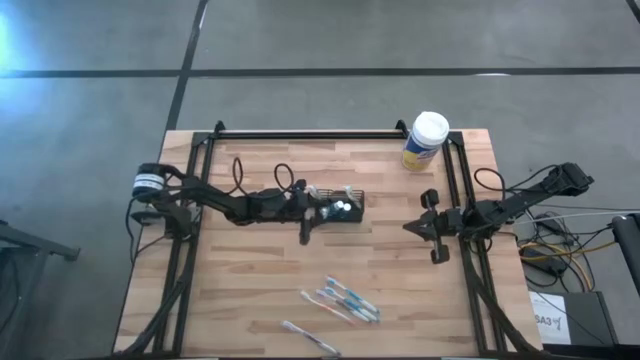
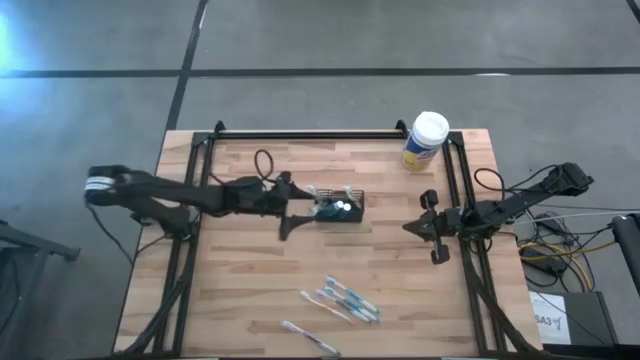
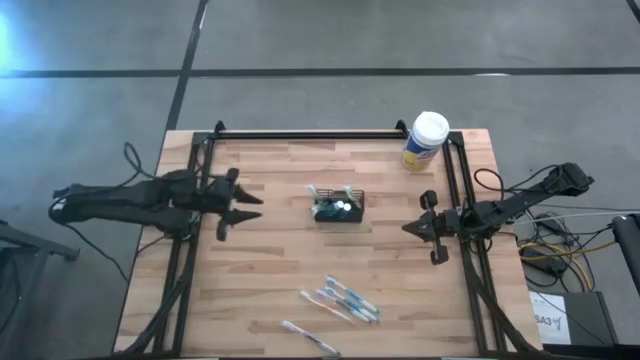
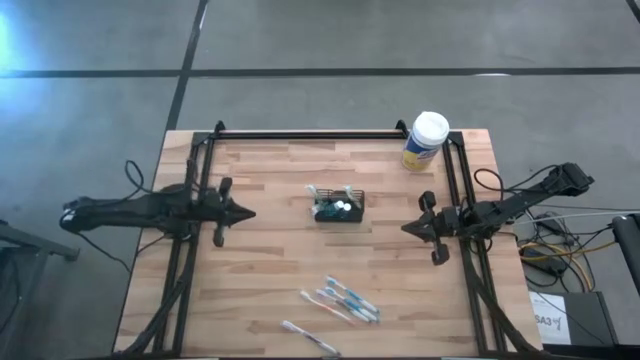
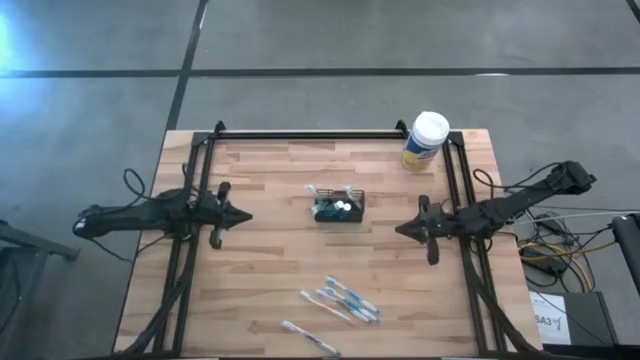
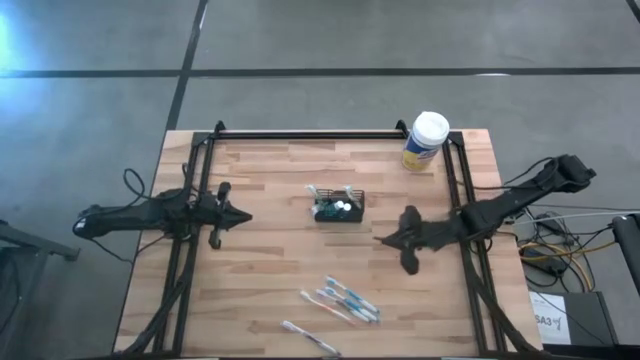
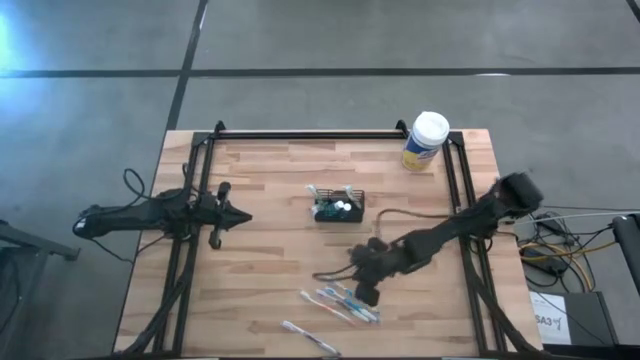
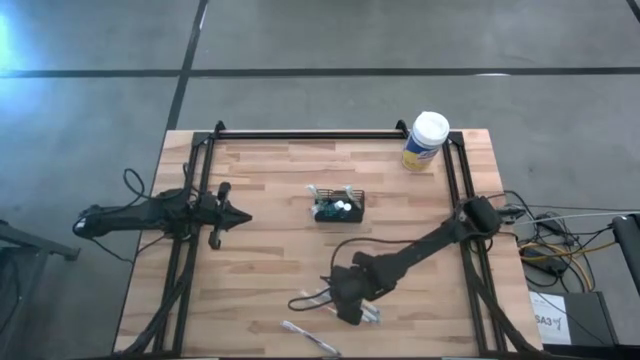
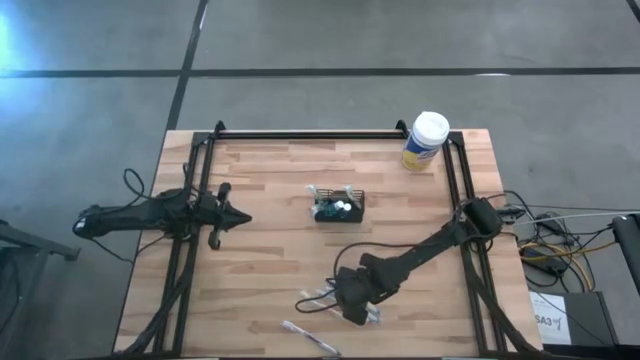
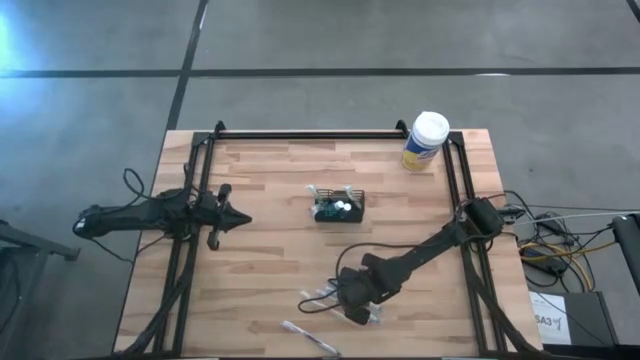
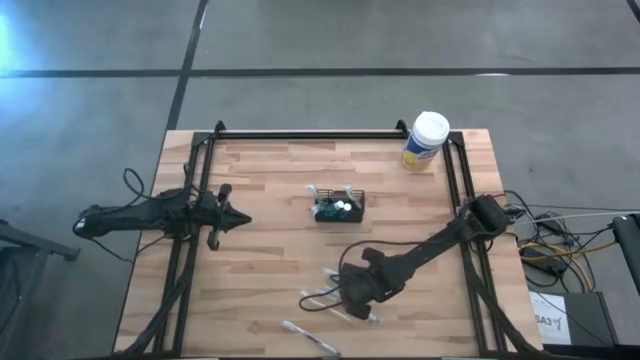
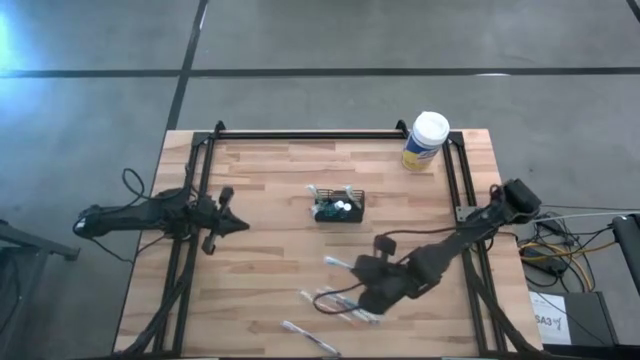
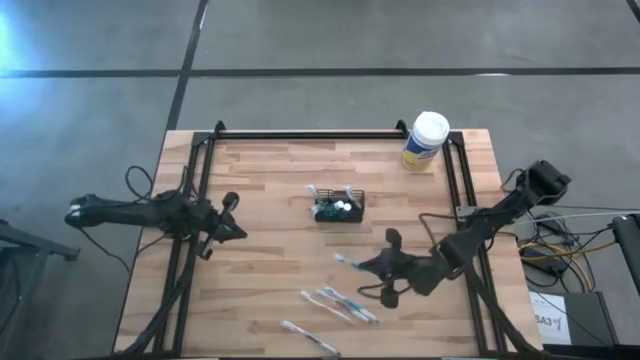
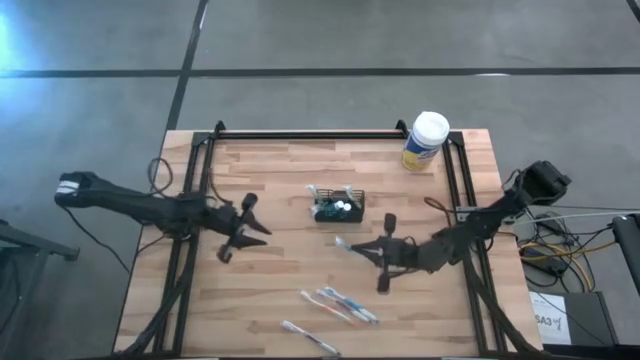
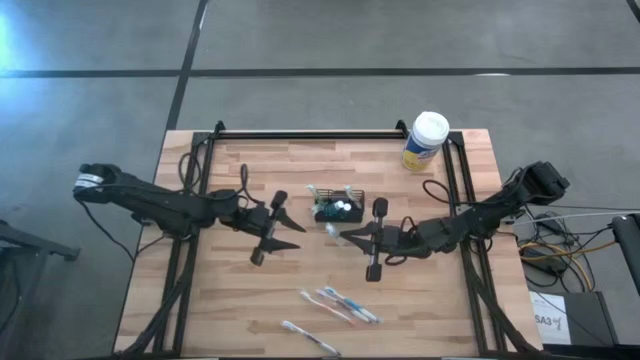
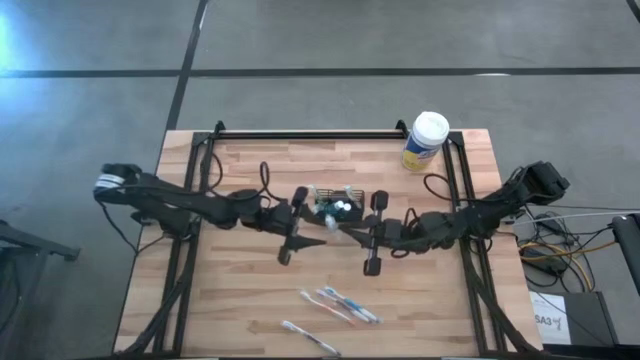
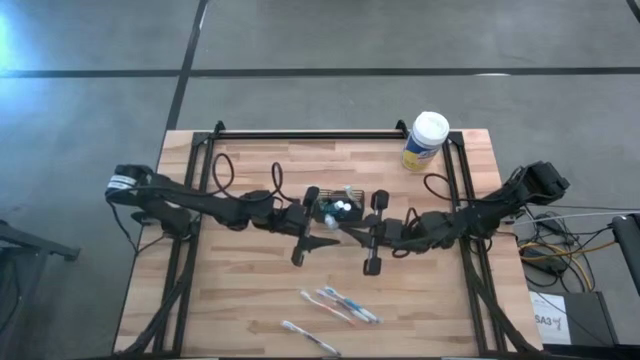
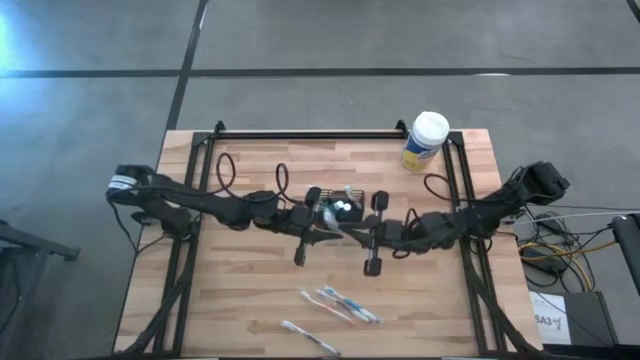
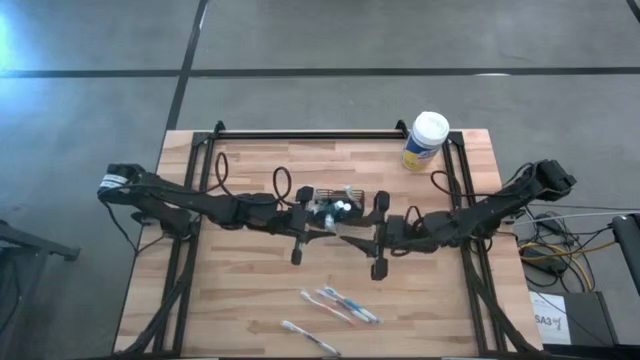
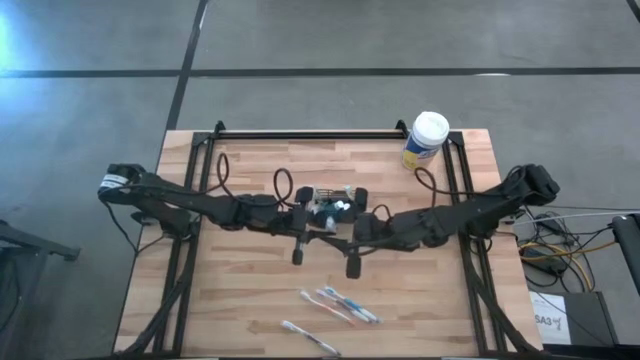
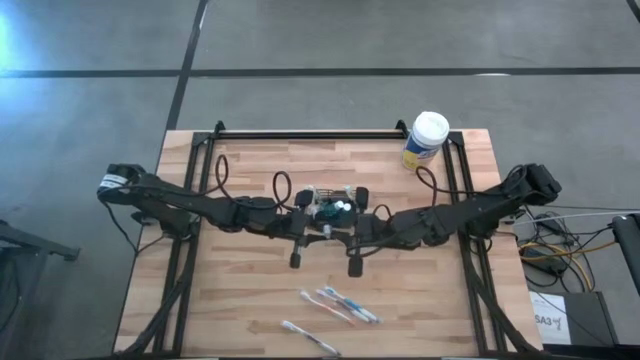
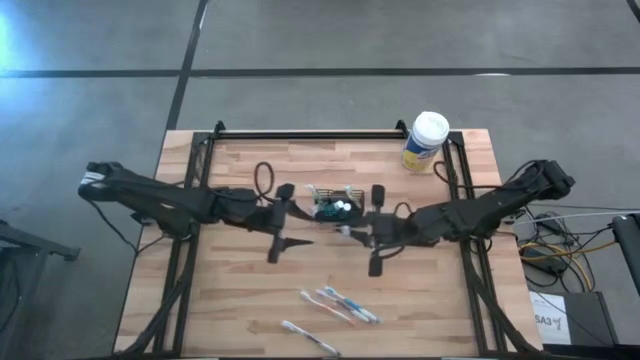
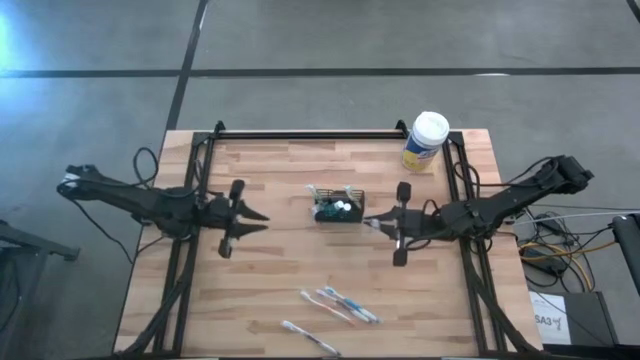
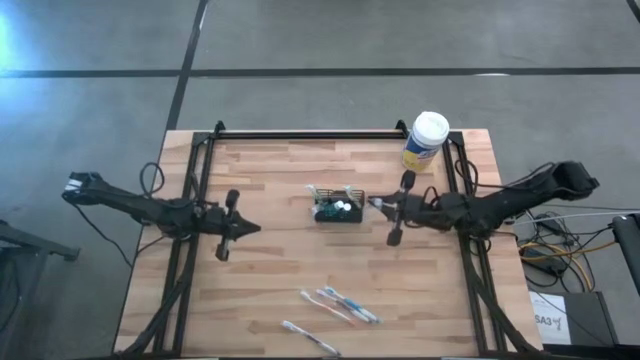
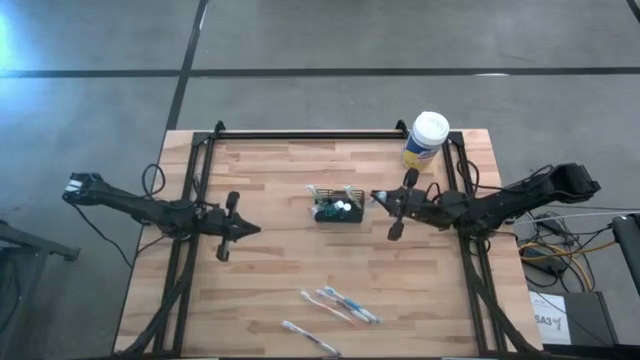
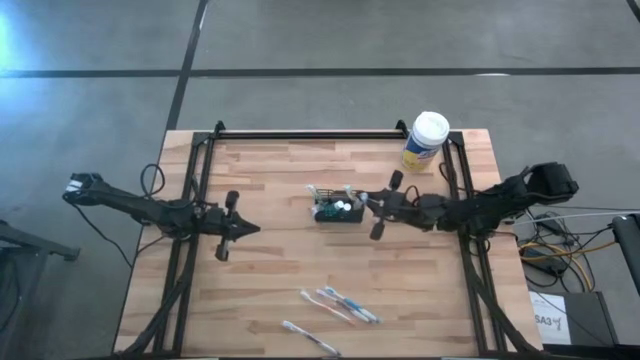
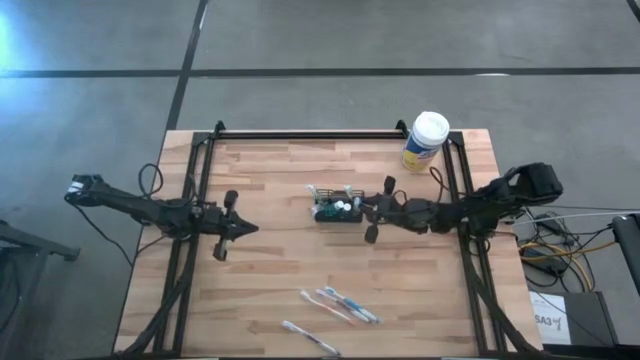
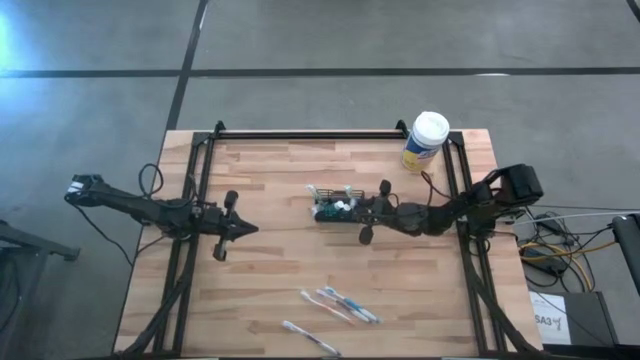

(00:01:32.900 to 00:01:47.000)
Task: Pick & Place toothbrushing station
Put the right blue toothbrush into the black wire organizer

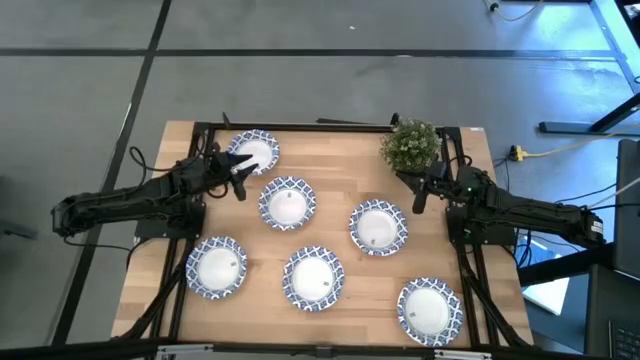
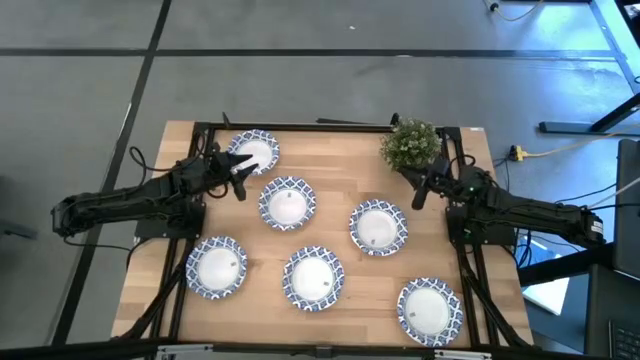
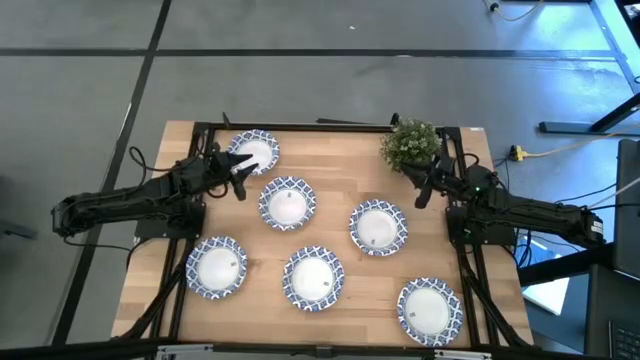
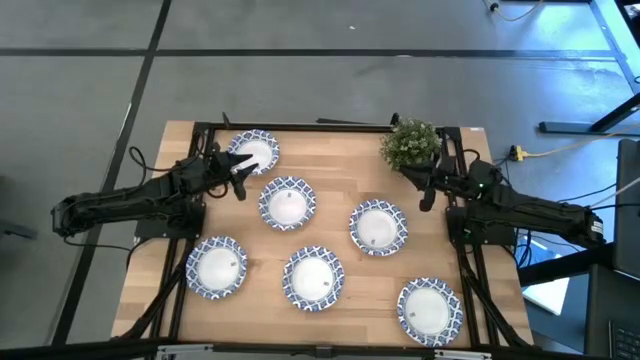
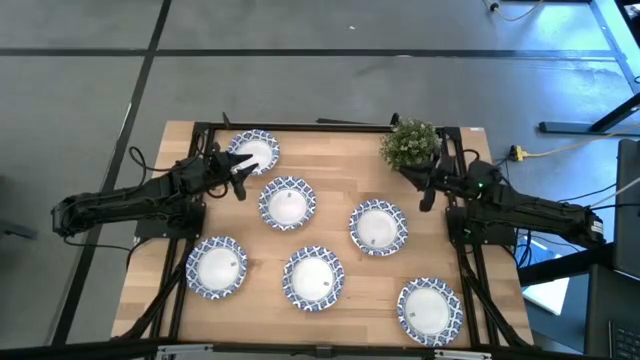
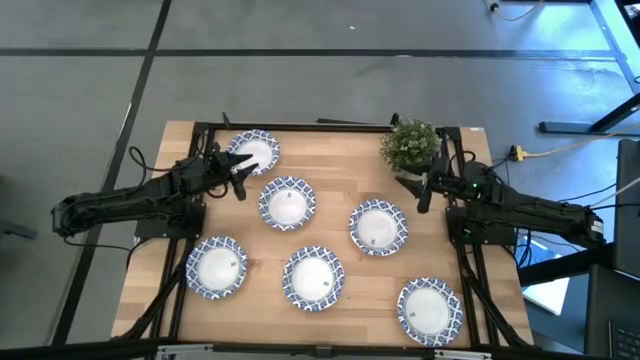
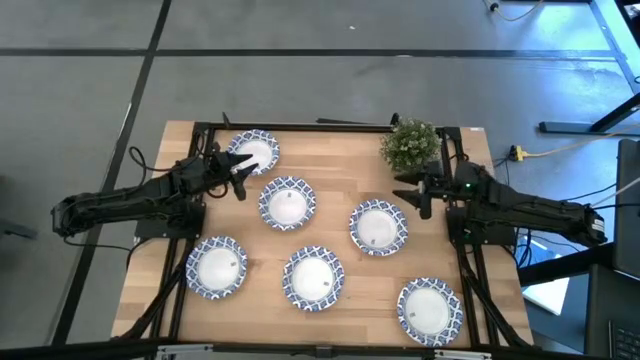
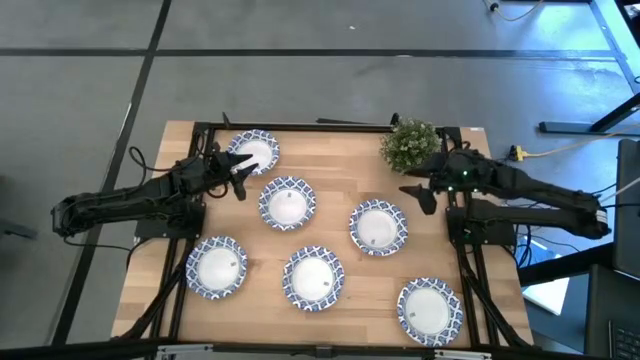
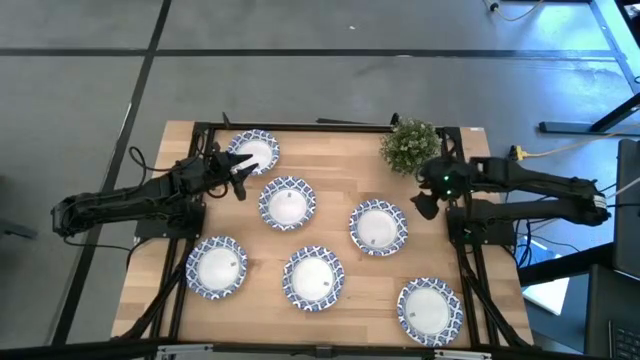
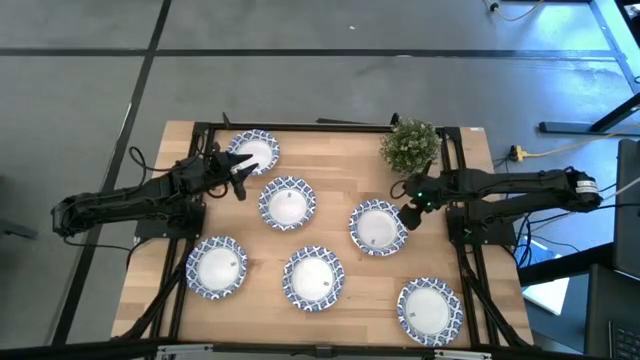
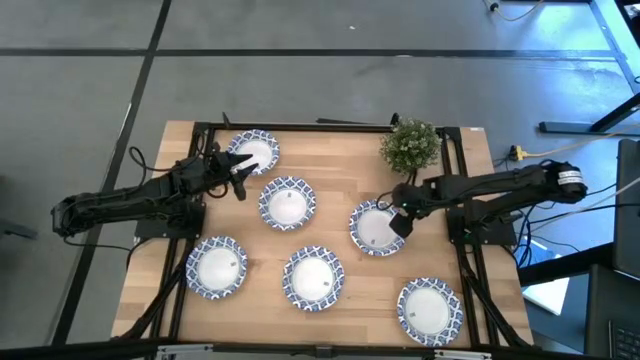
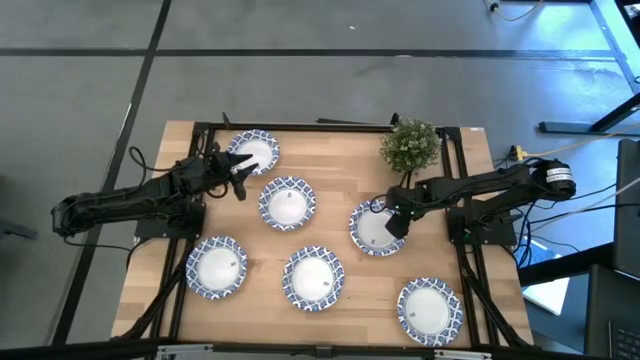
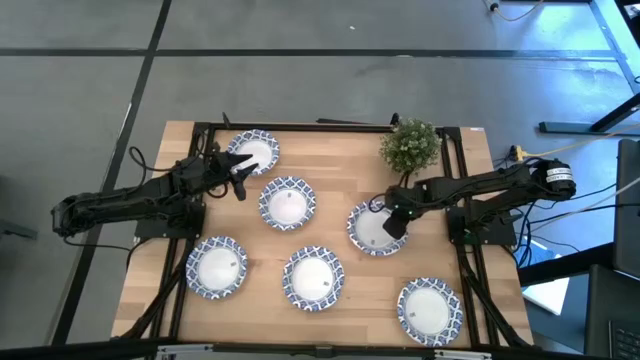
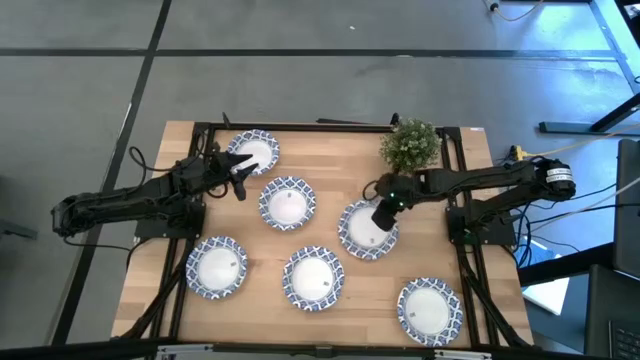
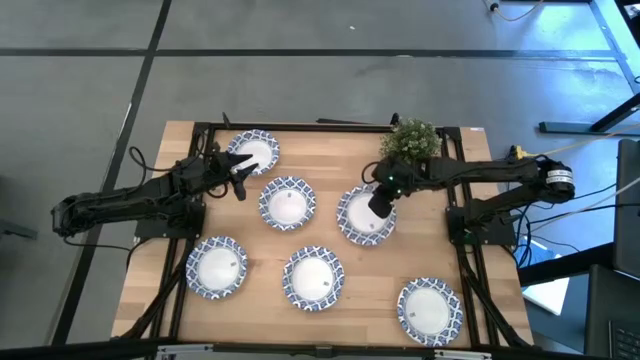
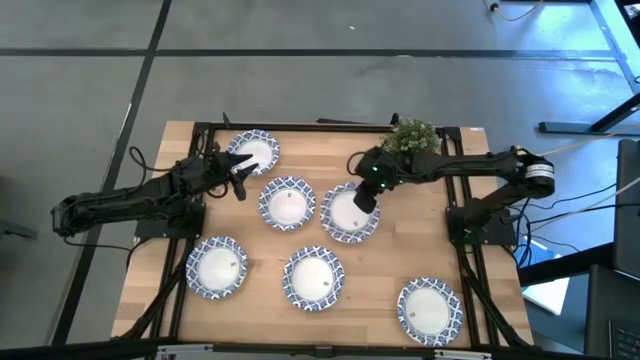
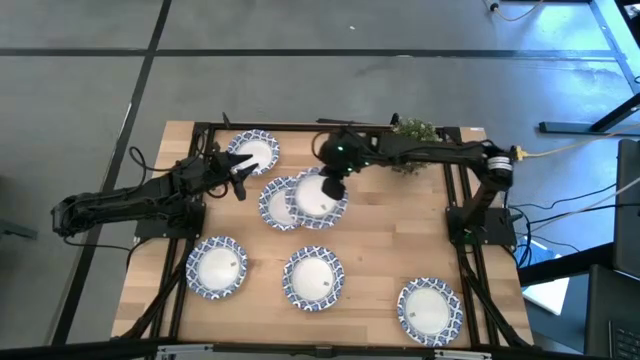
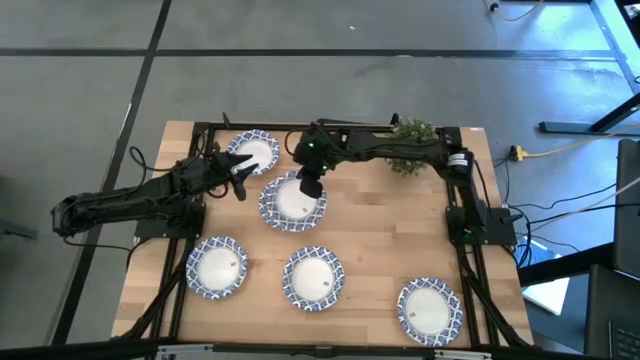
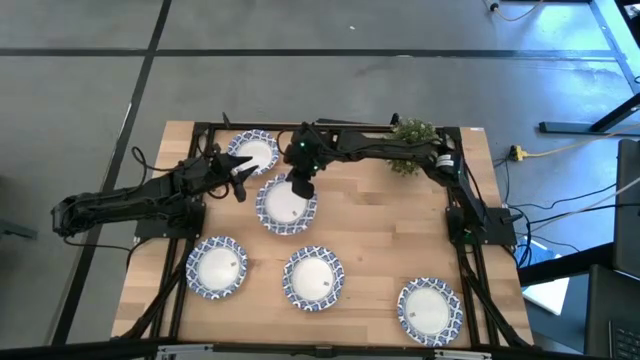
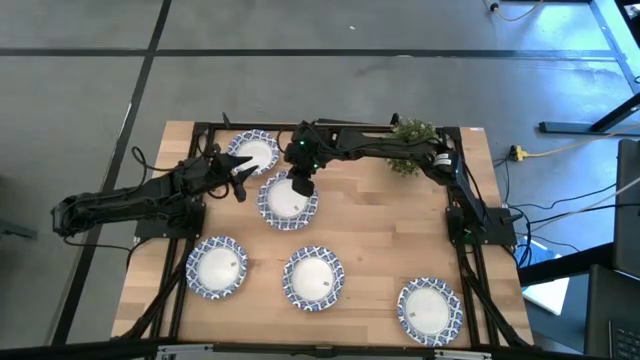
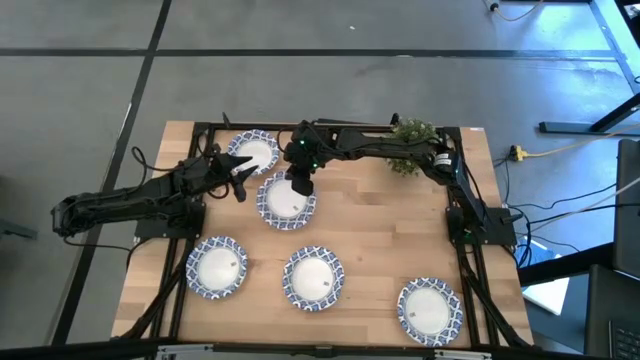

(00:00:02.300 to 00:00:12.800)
Task: Nest bowls inside each other
Stack the white patterned bowl on the other white patterned bowl
